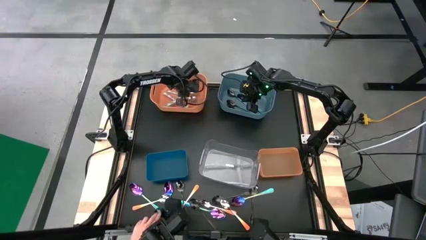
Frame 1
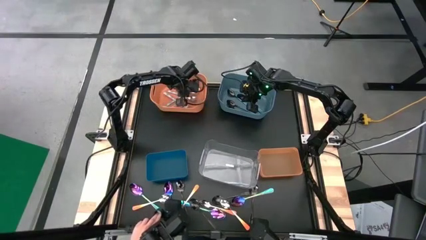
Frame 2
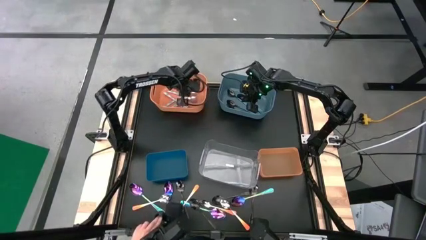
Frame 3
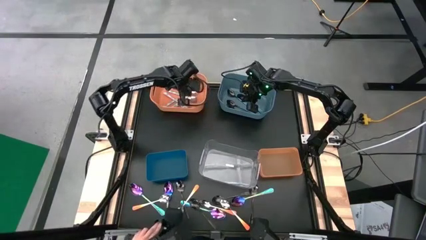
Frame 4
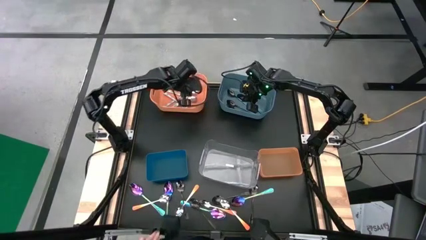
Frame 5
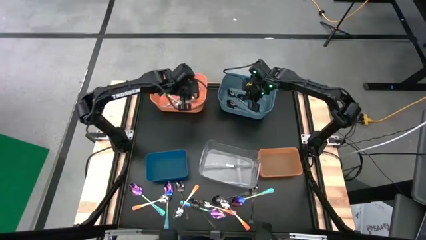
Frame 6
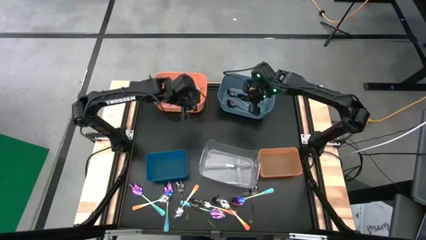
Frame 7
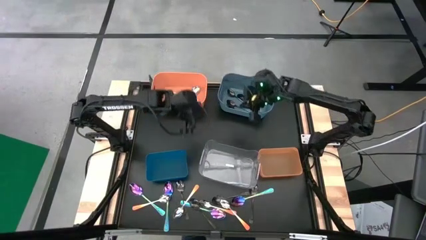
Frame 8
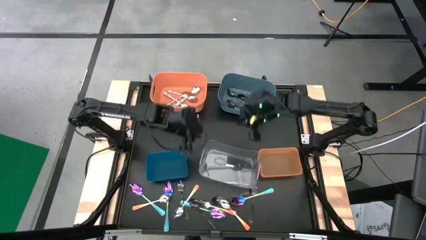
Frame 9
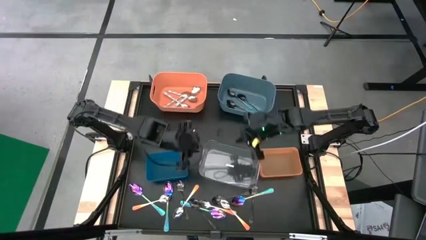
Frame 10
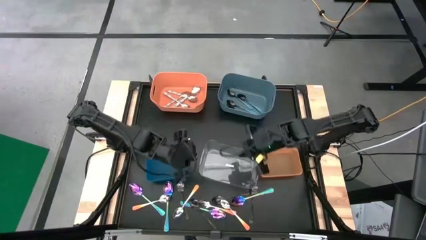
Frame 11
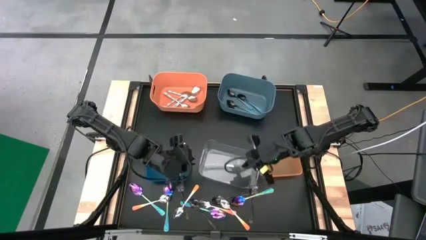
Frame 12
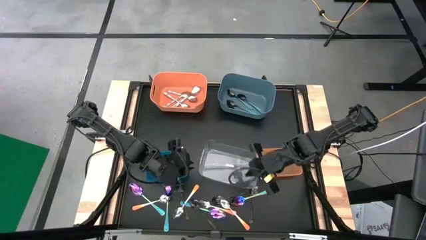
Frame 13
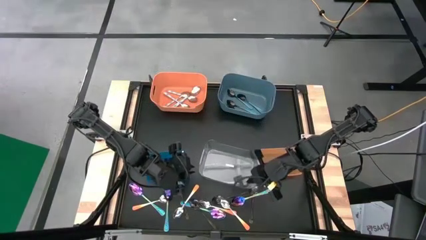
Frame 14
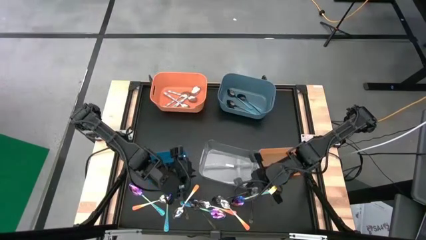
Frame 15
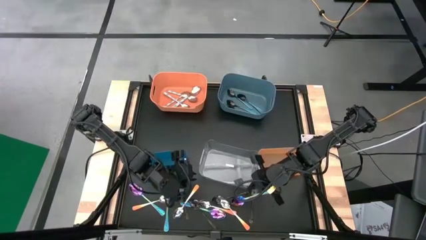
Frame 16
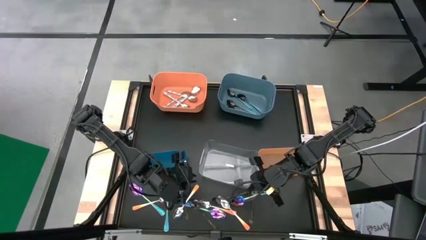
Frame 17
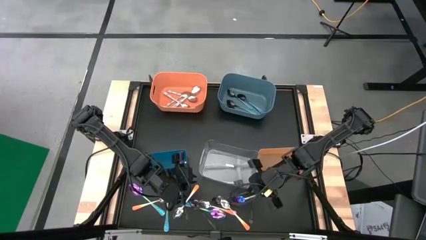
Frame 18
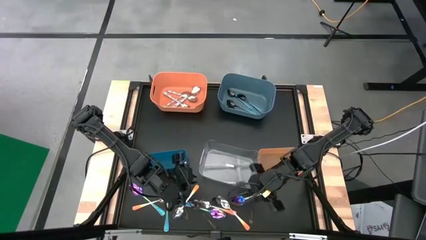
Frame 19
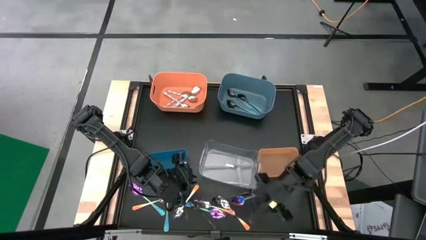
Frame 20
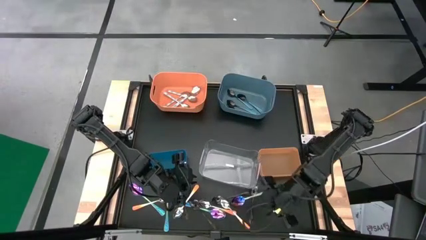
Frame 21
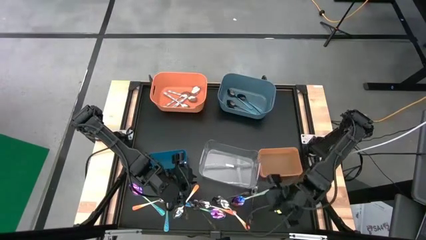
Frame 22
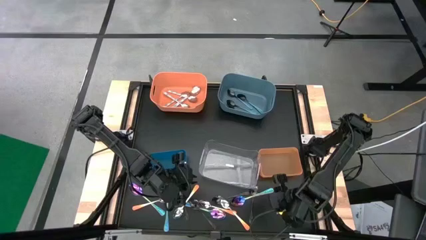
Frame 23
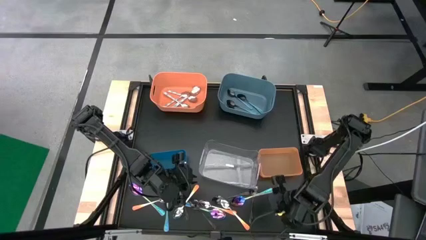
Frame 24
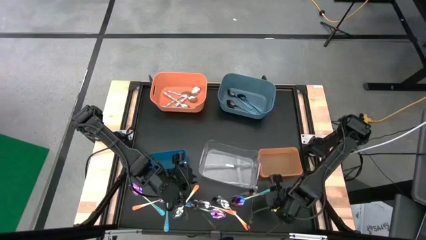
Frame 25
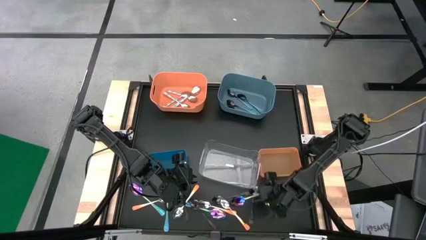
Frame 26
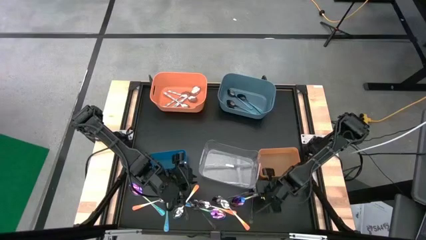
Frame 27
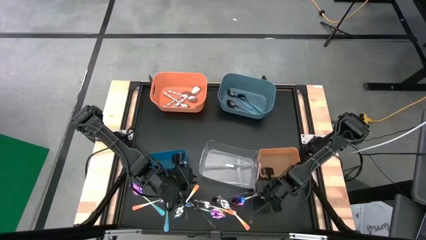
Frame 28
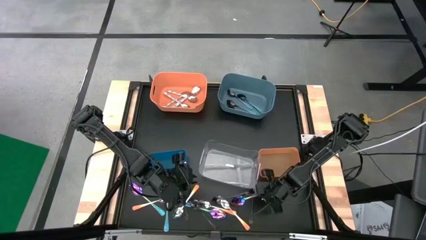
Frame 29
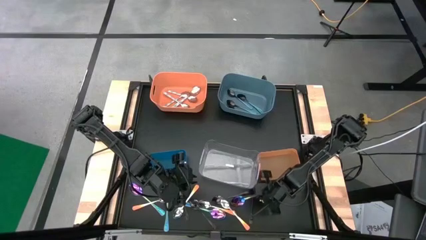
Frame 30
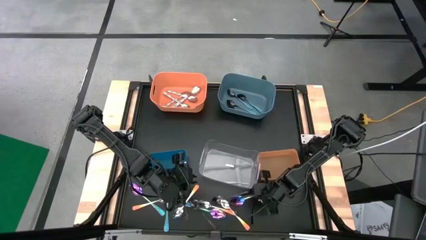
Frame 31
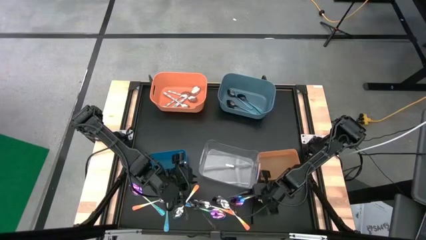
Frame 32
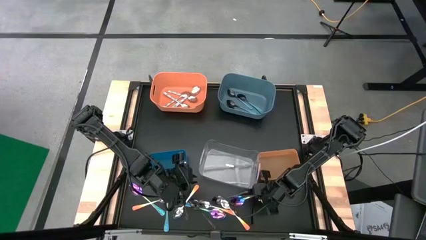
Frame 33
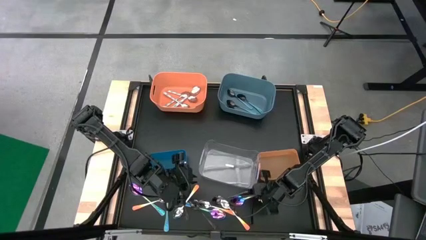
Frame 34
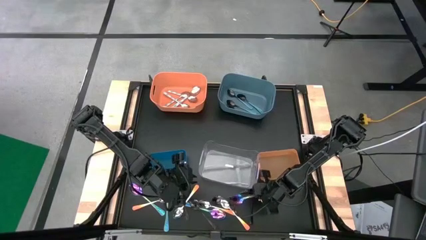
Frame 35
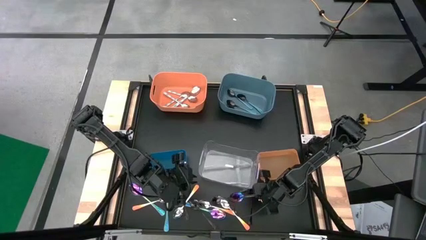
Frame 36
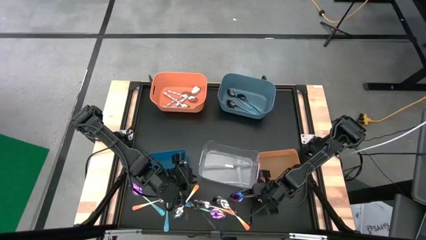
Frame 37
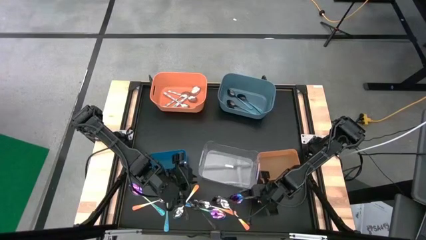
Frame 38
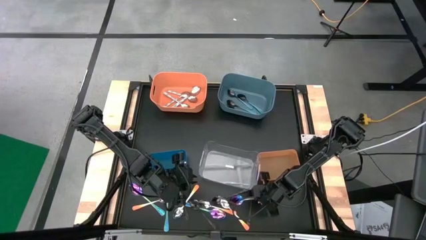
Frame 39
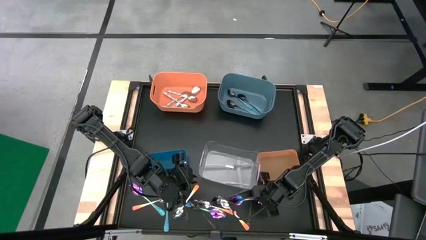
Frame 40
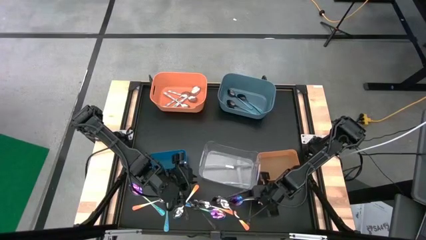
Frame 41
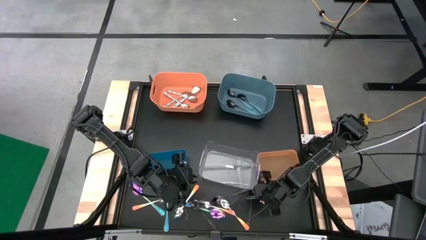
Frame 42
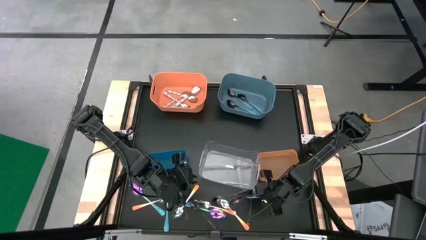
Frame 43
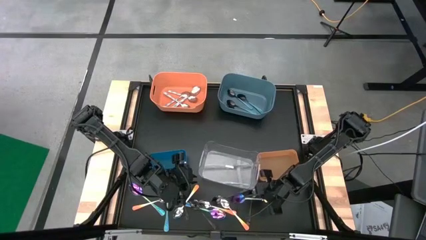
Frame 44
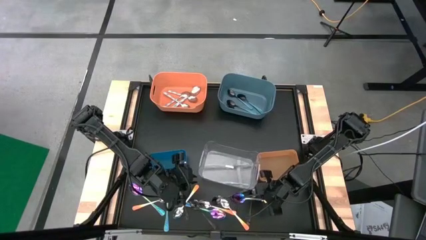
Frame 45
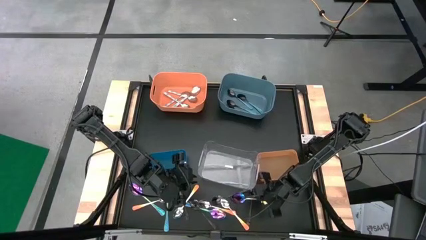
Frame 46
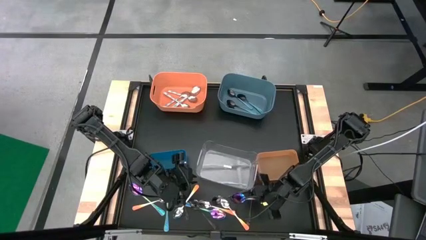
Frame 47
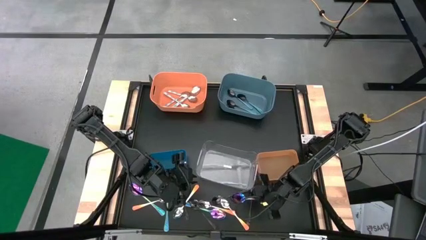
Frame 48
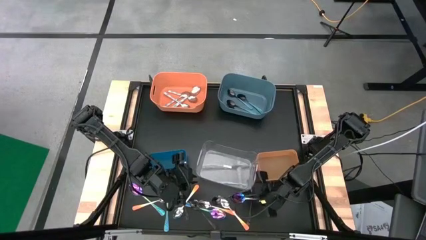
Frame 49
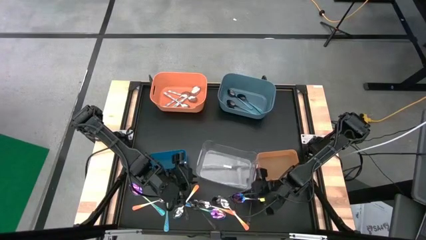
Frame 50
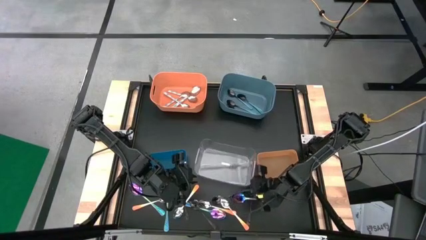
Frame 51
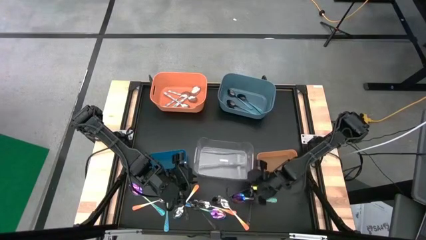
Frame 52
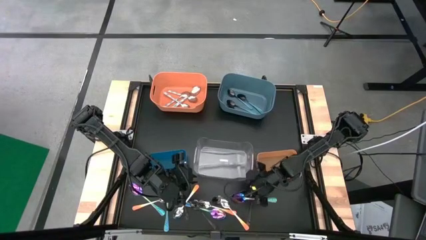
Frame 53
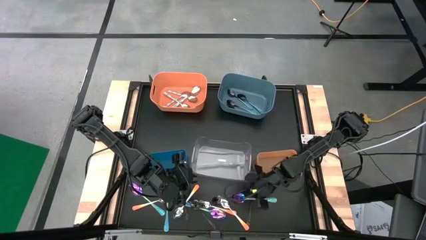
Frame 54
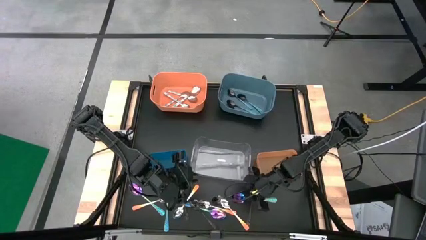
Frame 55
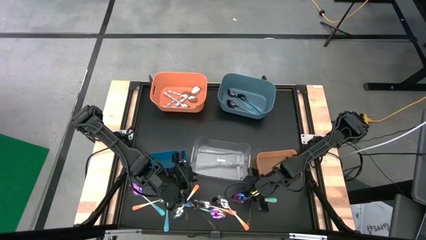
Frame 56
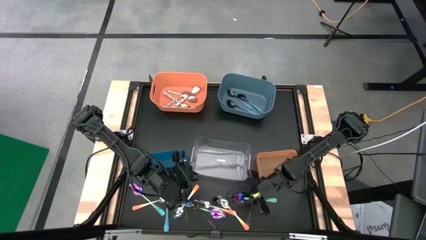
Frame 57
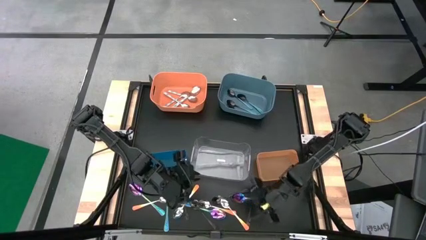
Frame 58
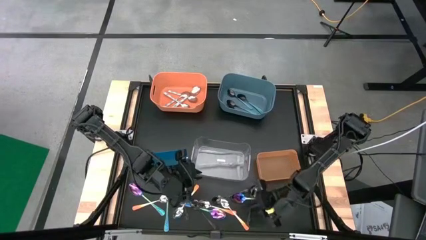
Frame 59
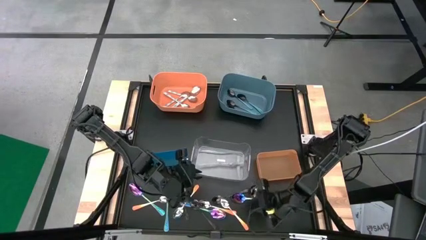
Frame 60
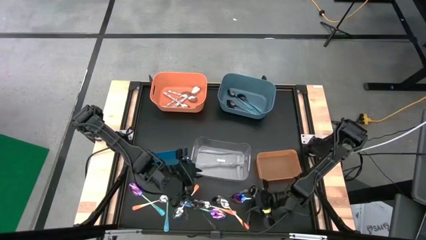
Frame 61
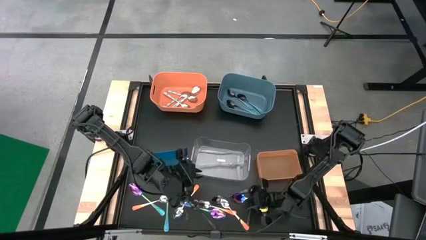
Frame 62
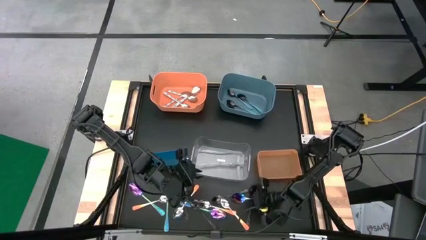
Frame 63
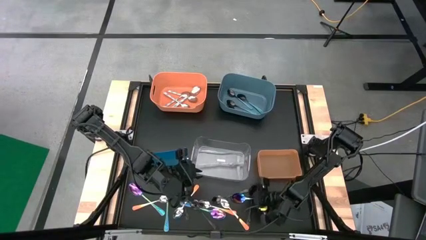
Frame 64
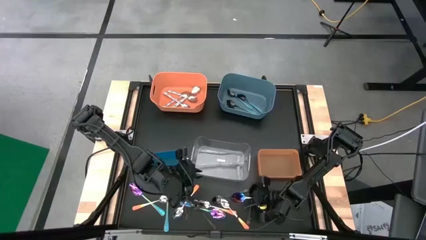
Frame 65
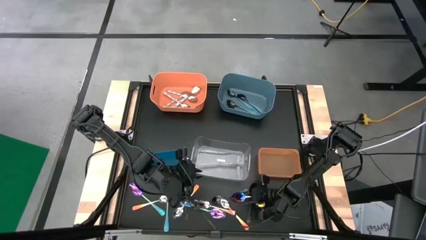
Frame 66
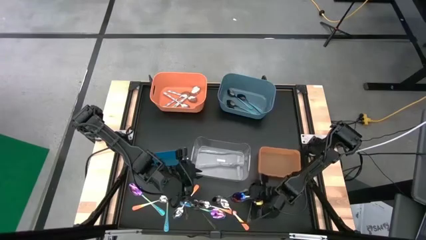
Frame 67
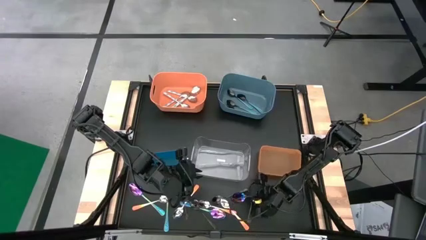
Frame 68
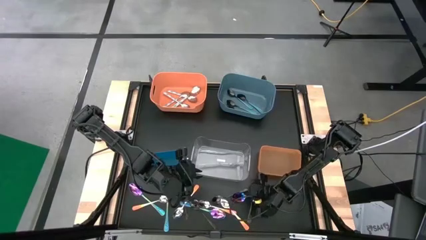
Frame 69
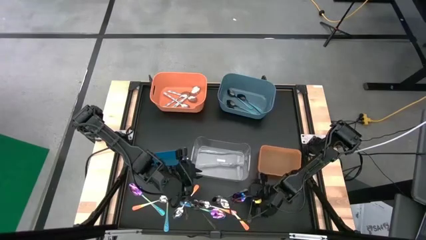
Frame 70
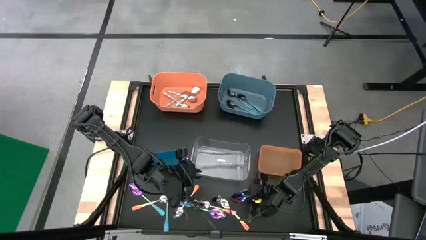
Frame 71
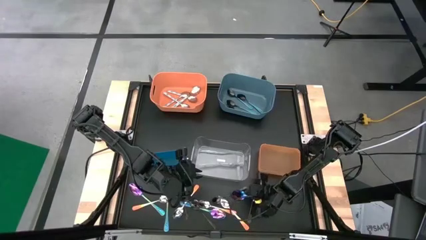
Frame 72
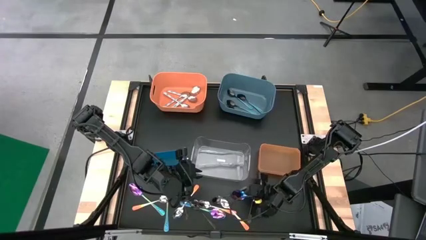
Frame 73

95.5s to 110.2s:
Task: Sort silverware by color (type)
Put the purple spoon into the transparent bin
